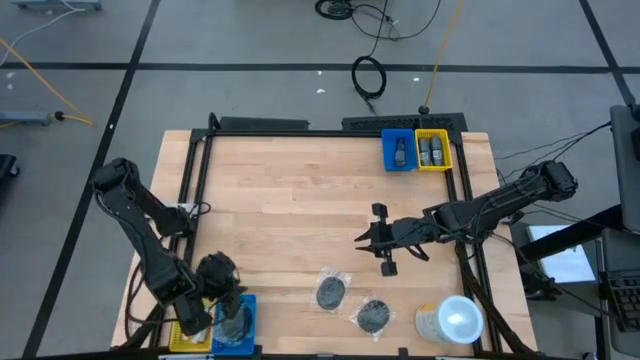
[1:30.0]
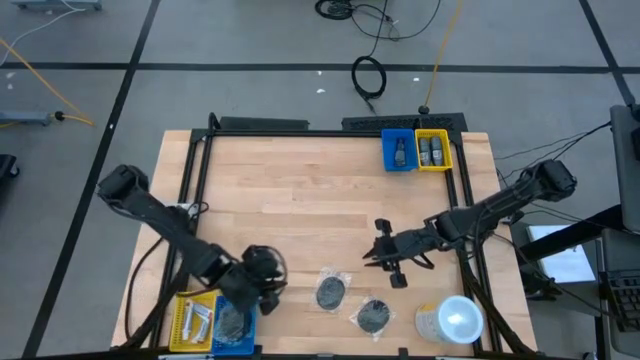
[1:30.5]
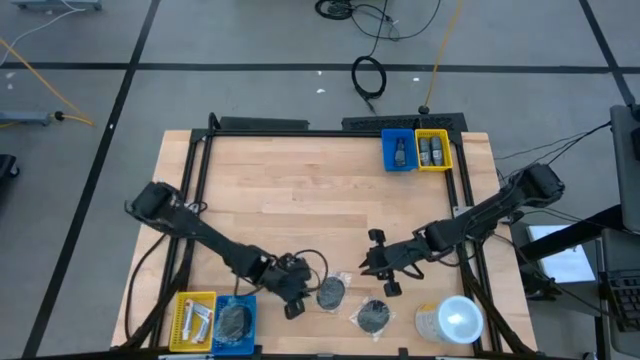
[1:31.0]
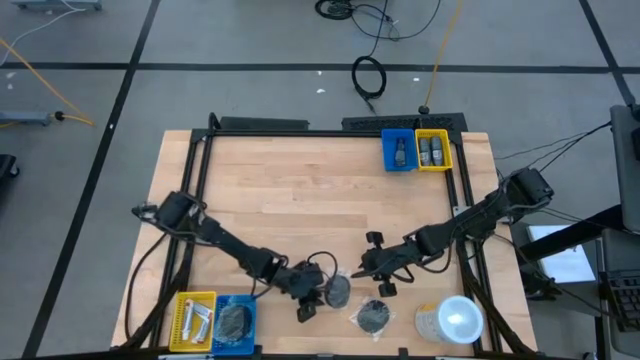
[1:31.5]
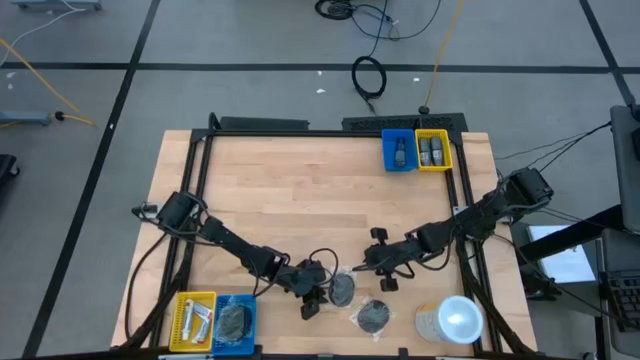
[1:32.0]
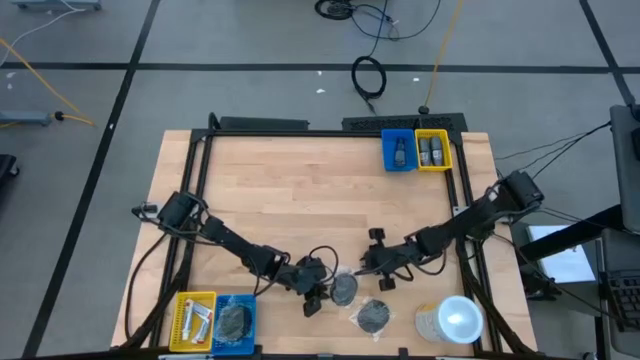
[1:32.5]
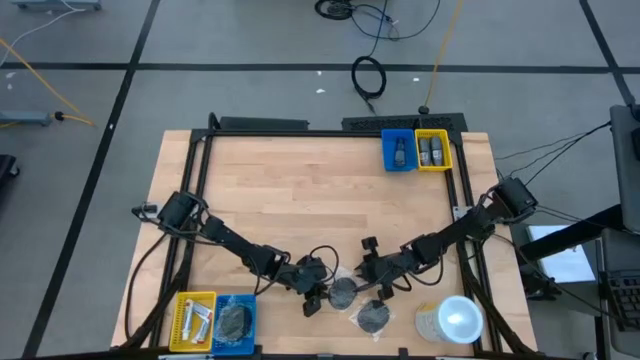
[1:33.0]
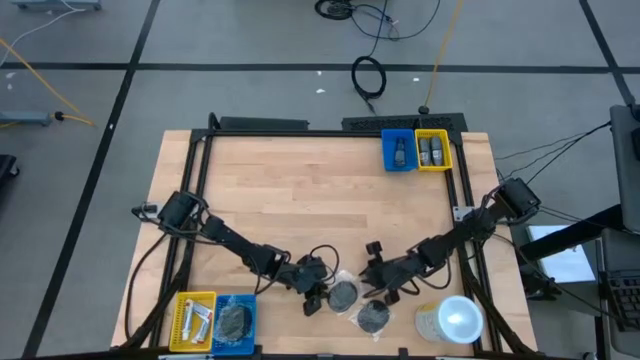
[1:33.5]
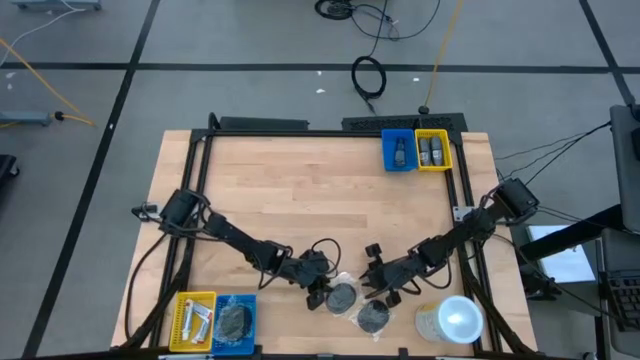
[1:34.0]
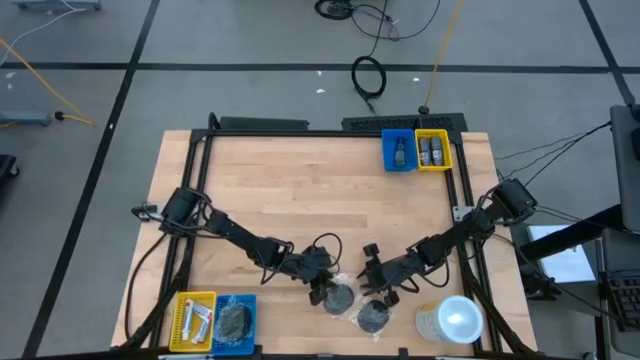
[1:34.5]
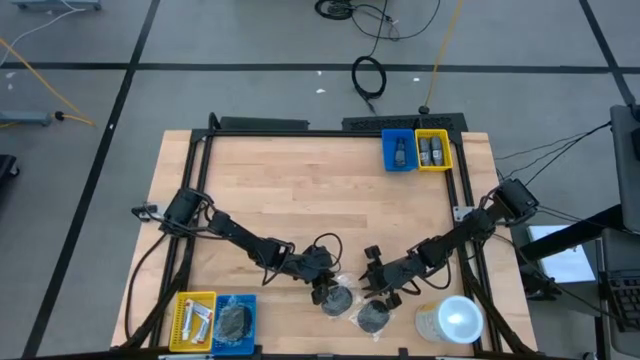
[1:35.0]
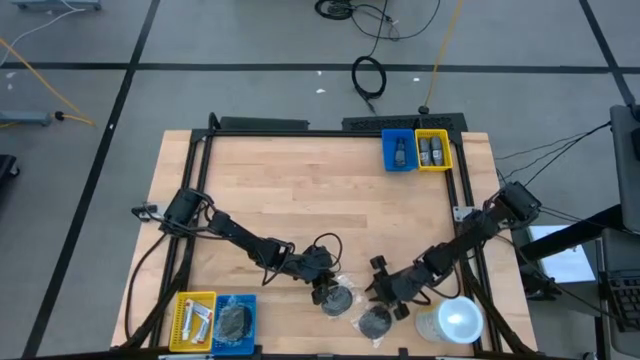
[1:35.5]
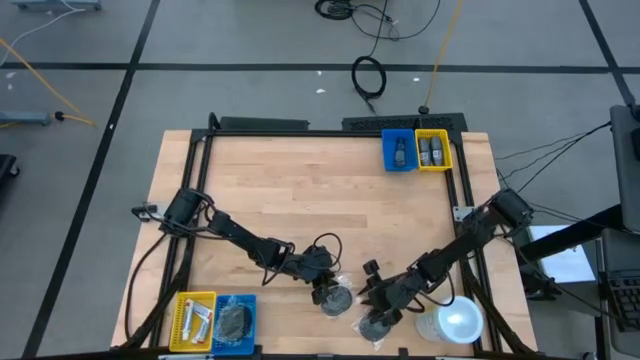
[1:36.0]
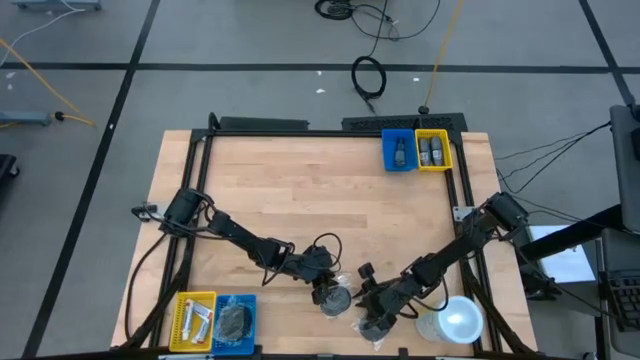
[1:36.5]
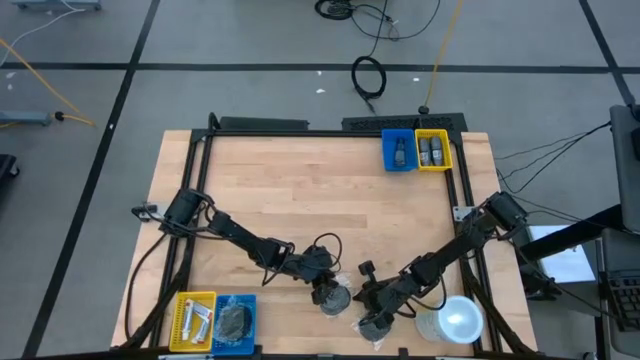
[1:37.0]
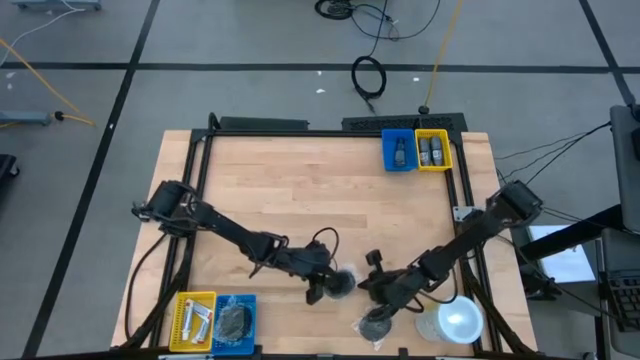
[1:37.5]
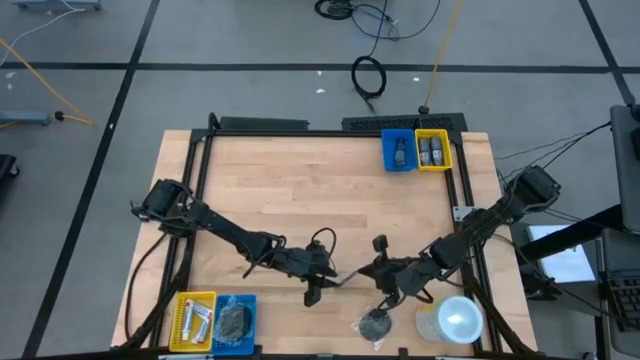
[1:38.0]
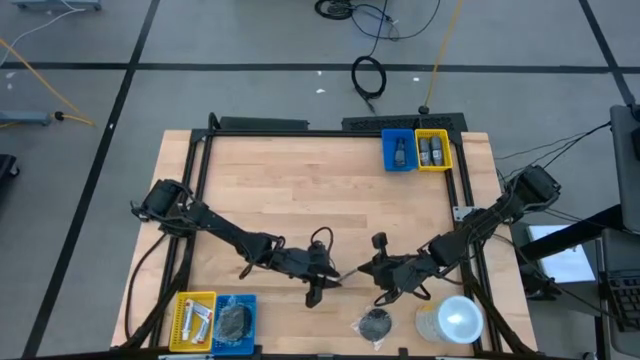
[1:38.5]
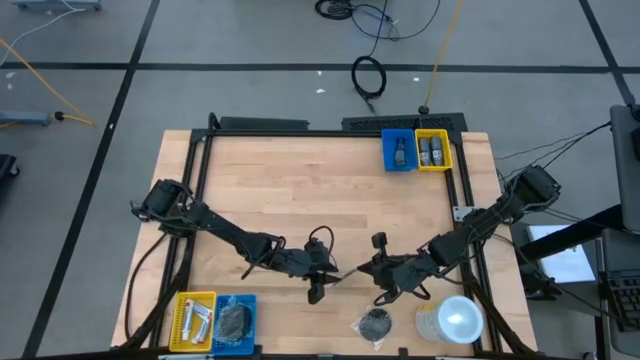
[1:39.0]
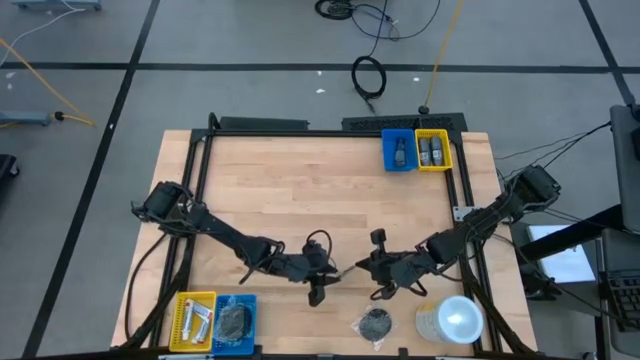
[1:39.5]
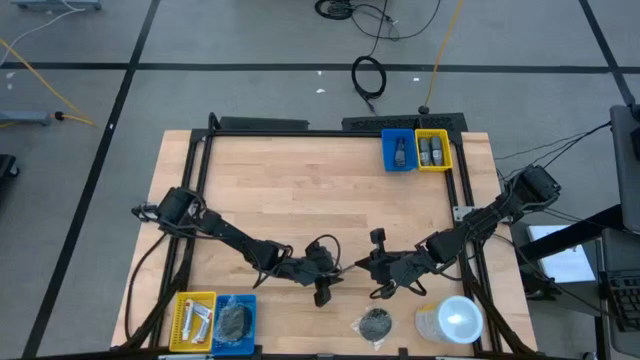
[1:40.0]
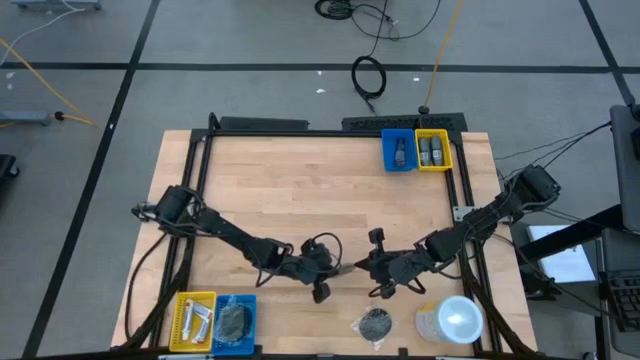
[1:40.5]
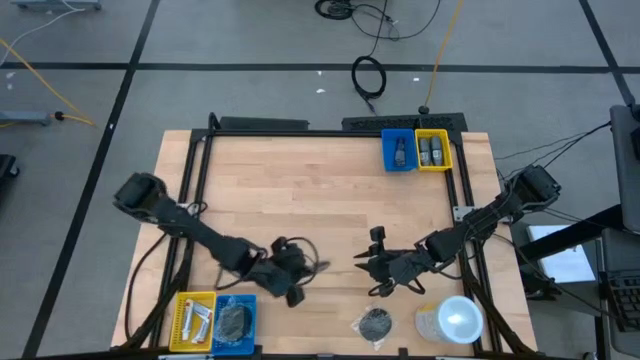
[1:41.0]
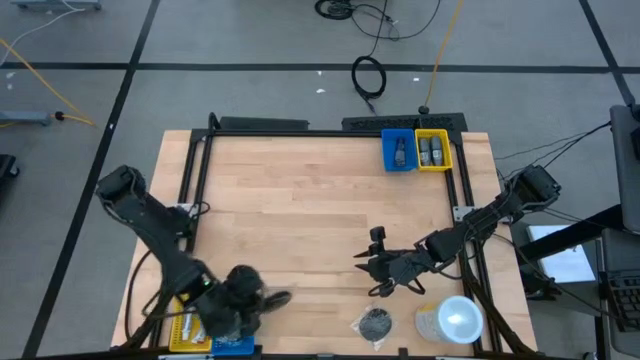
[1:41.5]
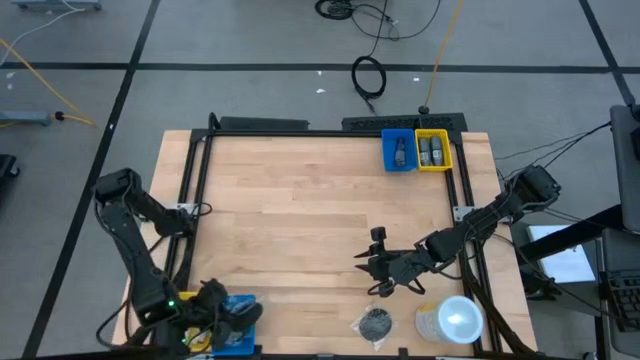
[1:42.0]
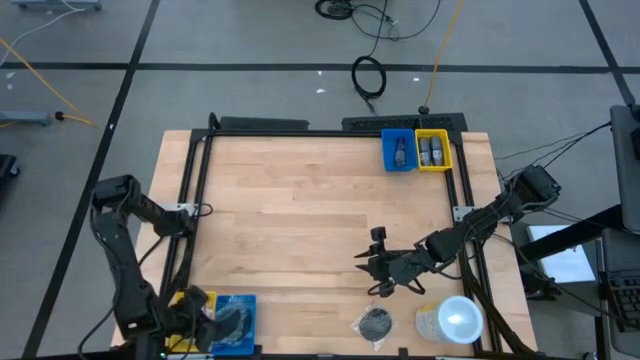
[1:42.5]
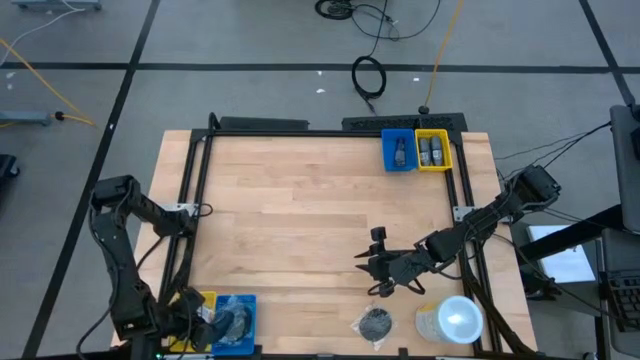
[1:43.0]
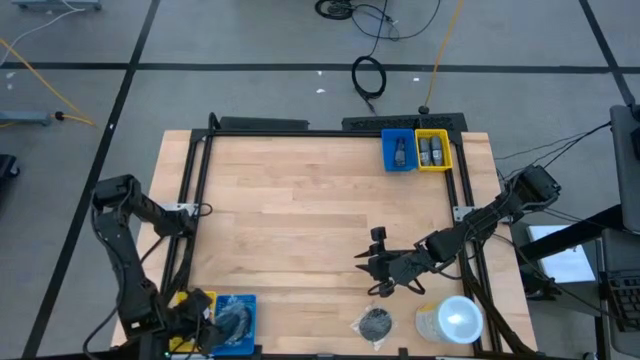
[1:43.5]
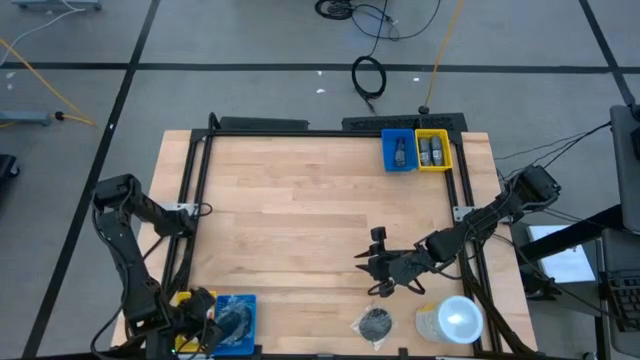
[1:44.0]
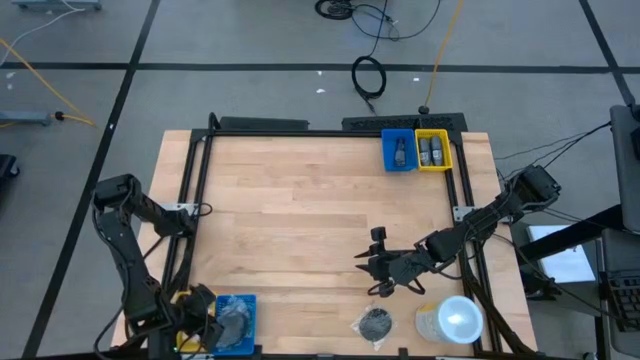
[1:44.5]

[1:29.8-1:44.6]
Task: Pick & Place Travel size toiletries
Put the black hairbrush into the bottom blue bin

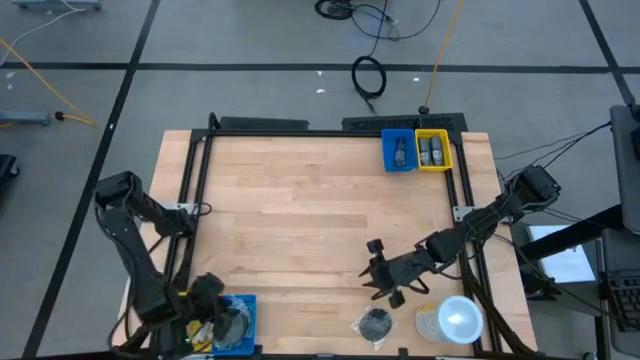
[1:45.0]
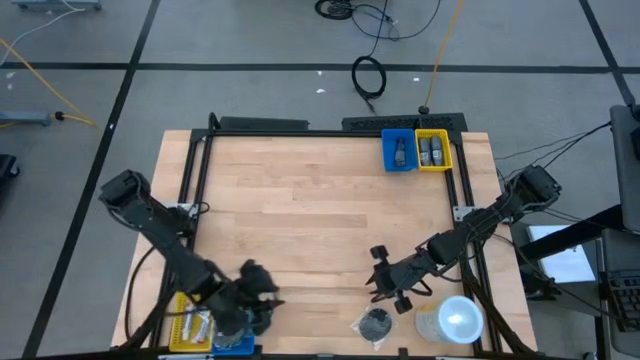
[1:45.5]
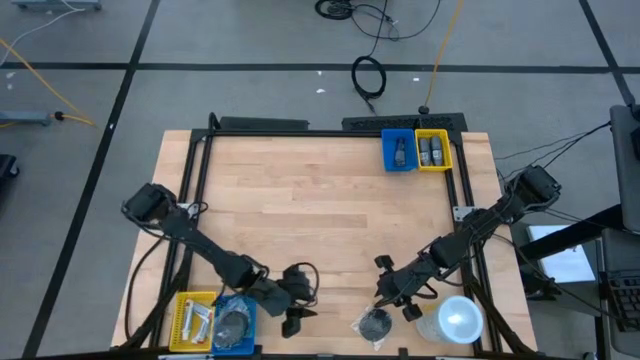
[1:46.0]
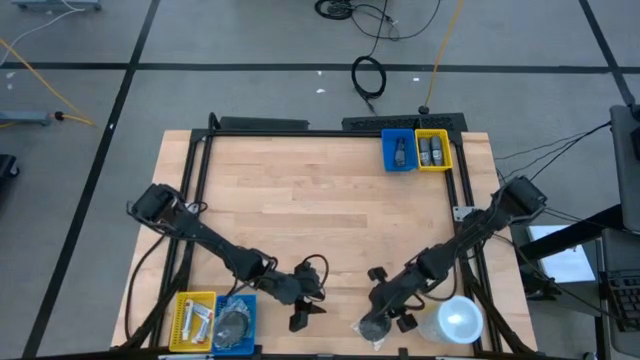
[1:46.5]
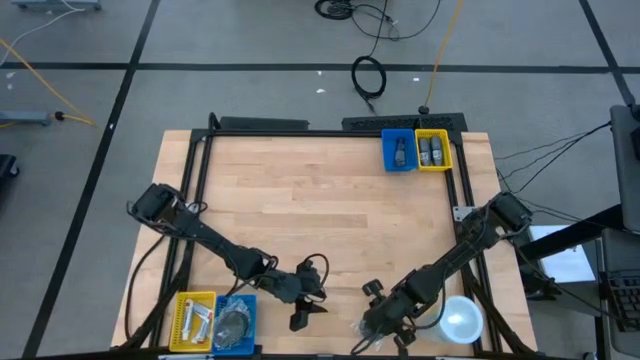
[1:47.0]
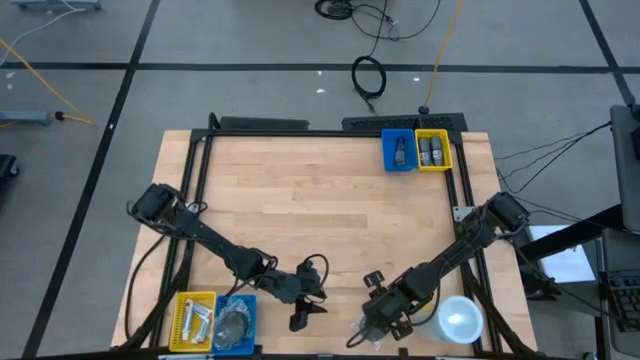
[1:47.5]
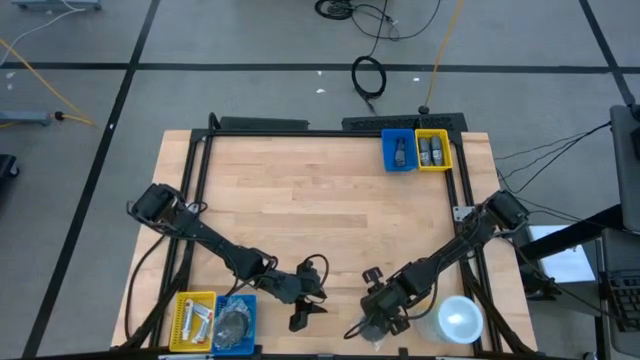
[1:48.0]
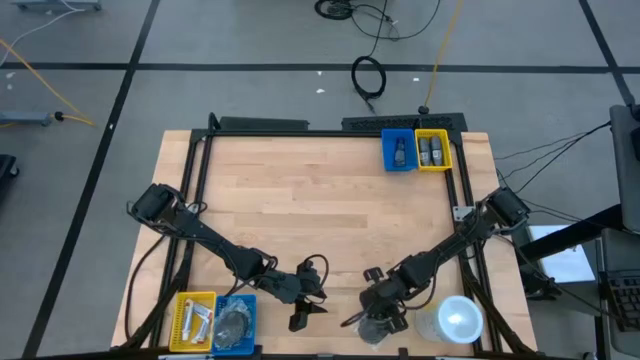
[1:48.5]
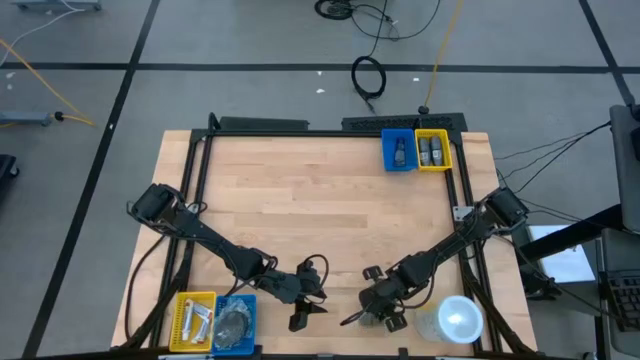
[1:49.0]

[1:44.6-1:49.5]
Put the black hairbrush into the bottom blue bin

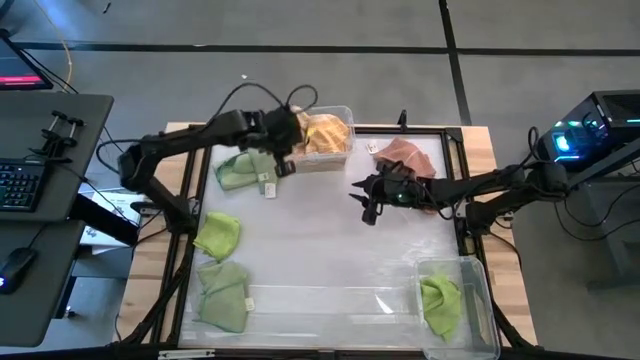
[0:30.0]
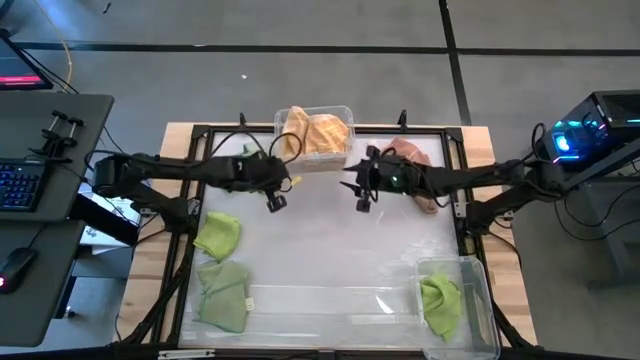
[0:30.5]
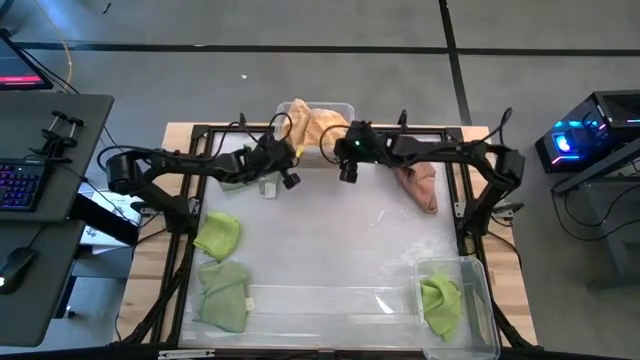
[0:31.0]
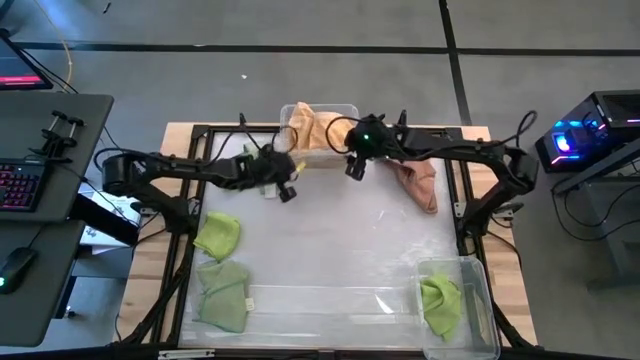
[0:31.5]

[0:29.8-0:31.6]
Task: Sort towels by color in basket
Adjust the top transparent bin
